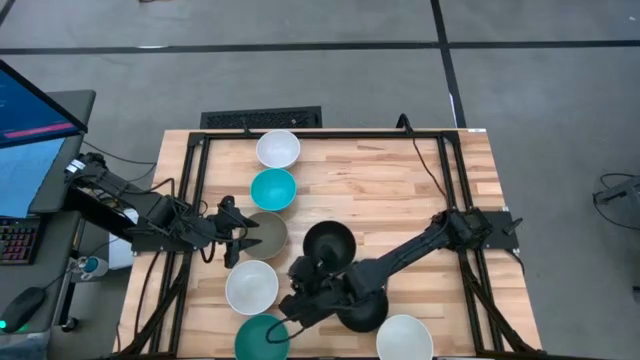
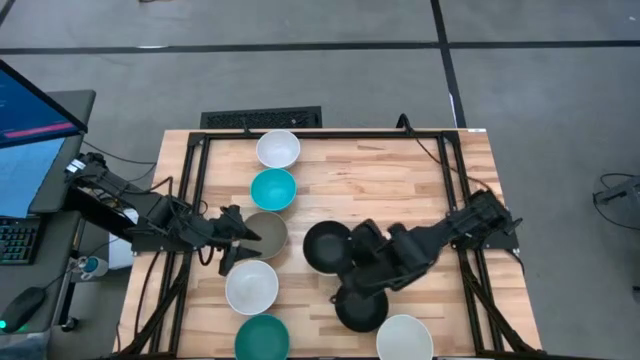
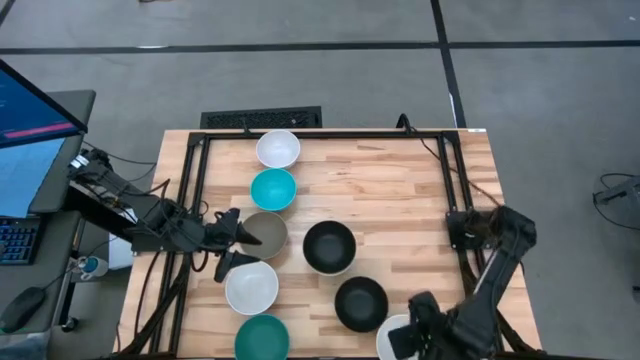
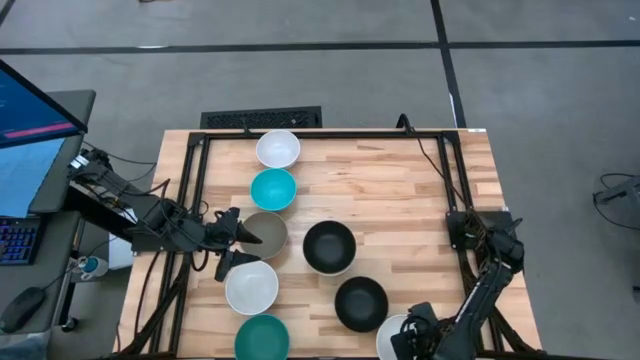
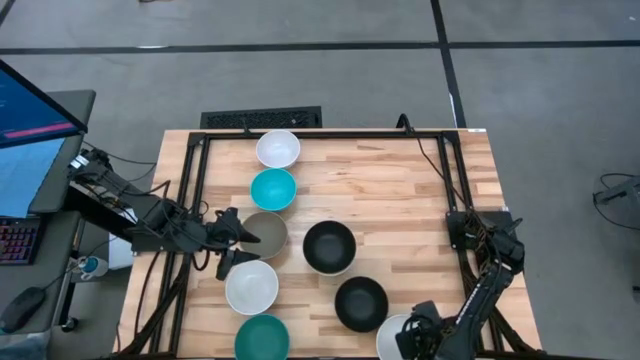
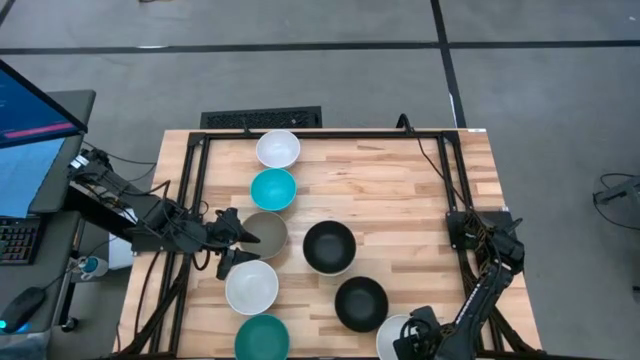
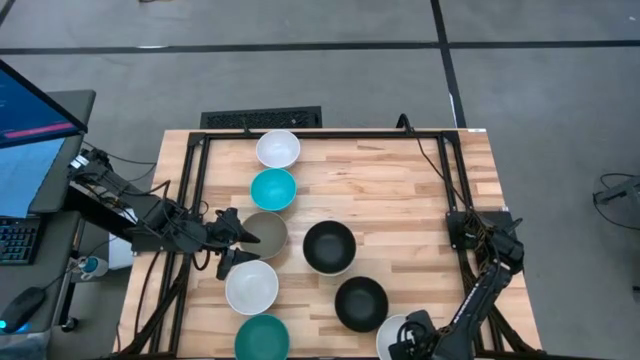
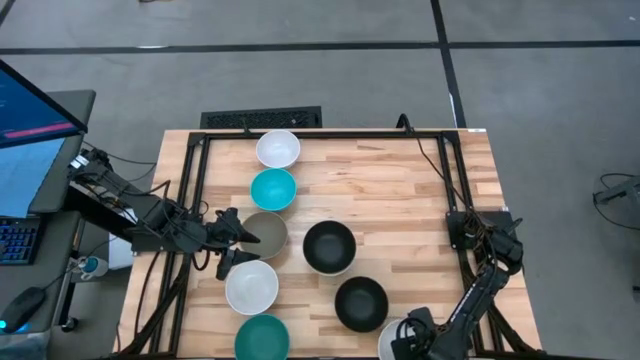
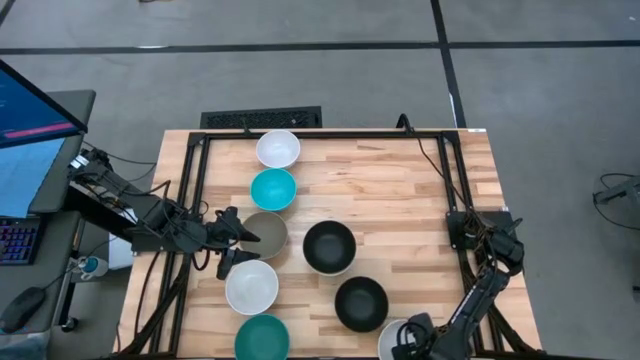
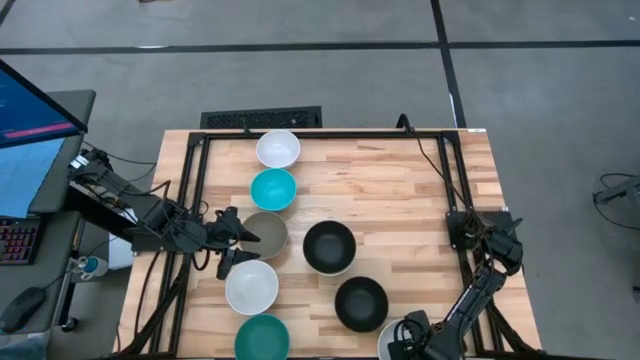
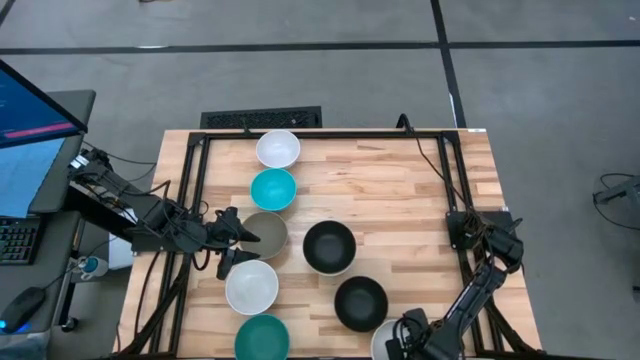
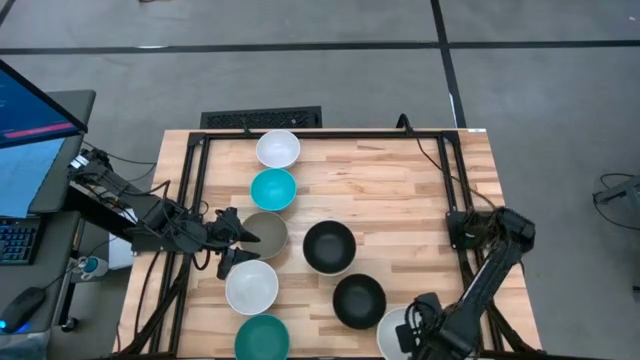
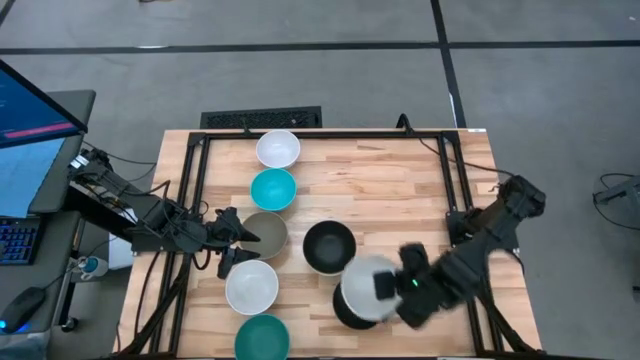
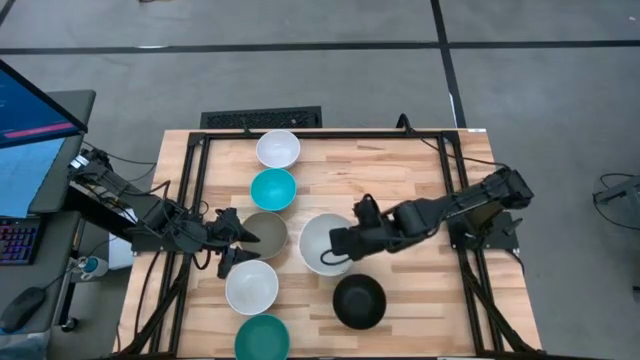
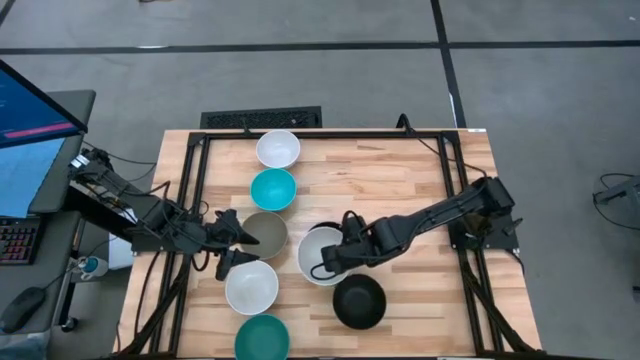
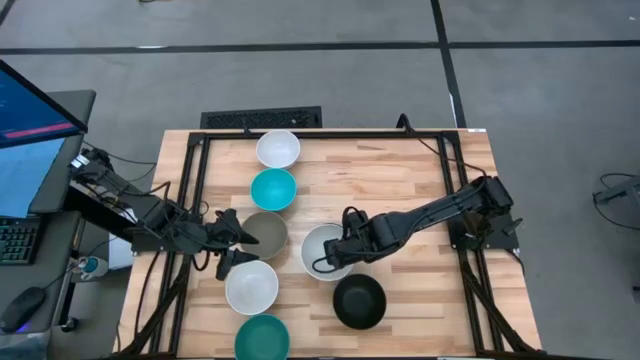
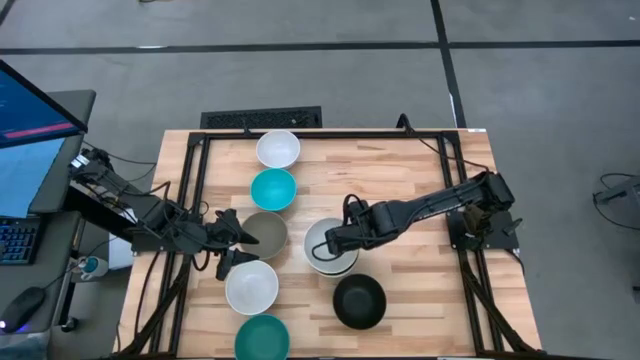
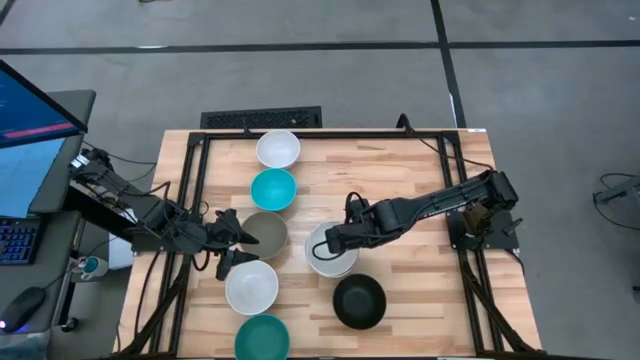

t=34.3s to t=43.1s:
Task: Nest bowls inside each other
Stack the white bowl on the black bowl

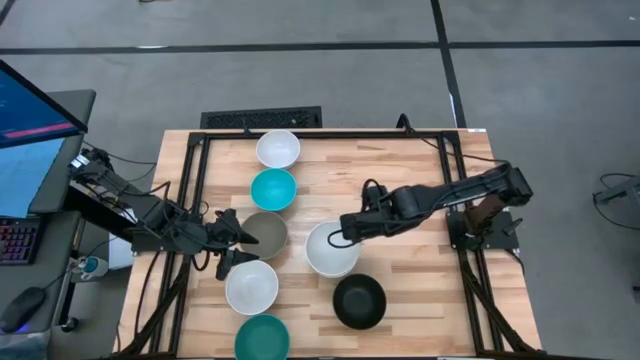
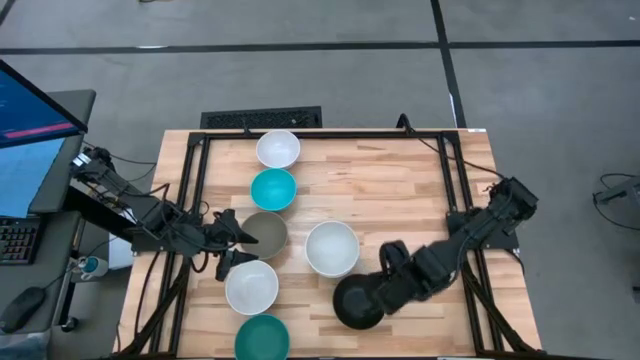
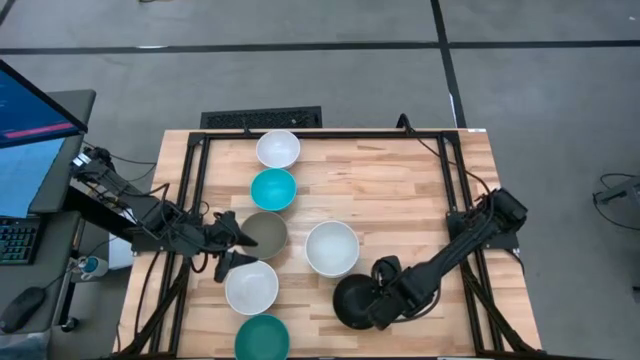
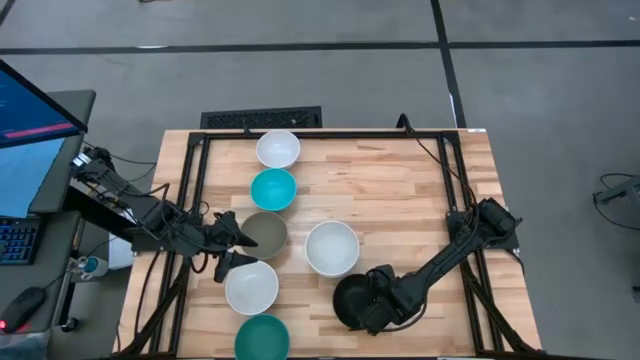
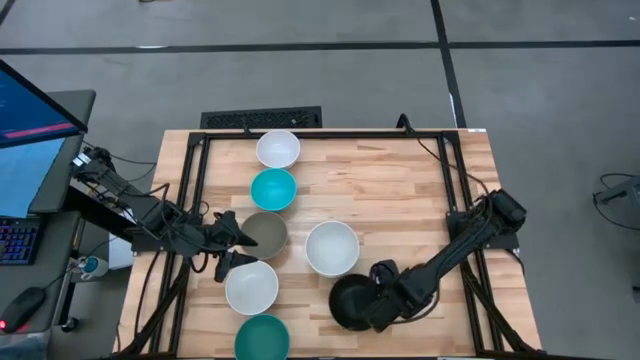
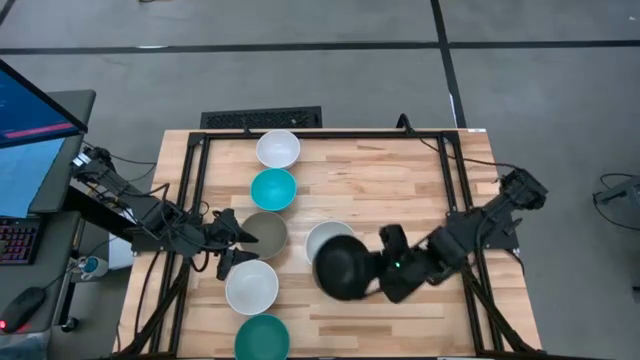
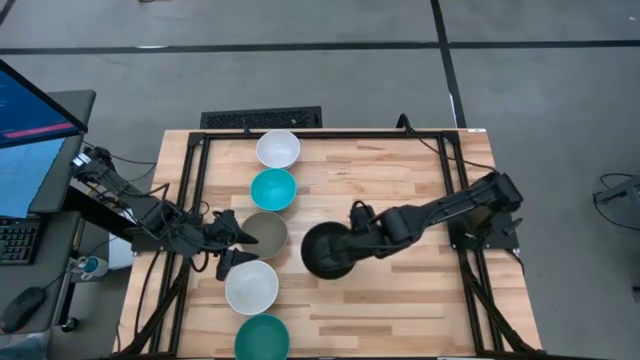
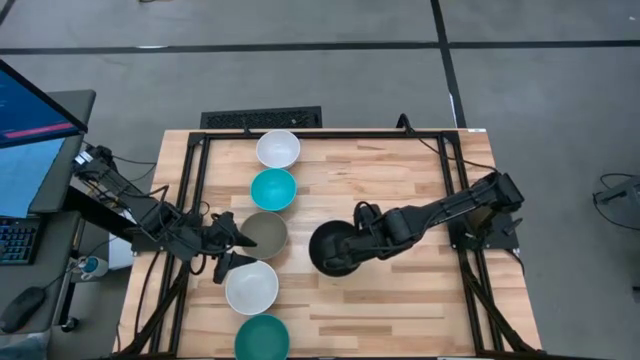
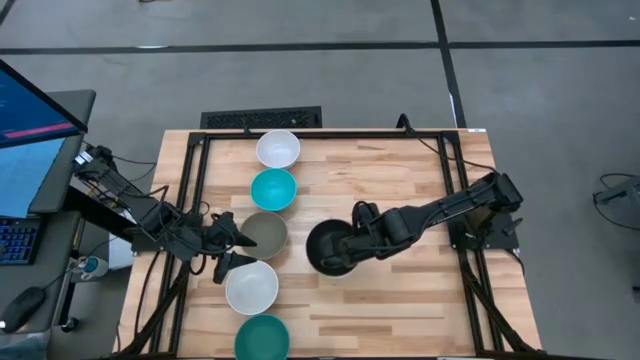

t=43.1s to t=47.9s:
Stack the black bowl on the white bowl

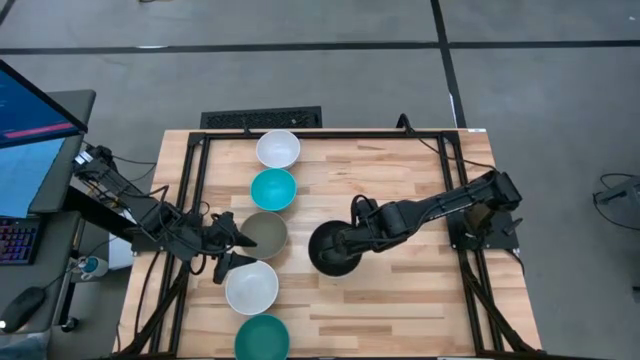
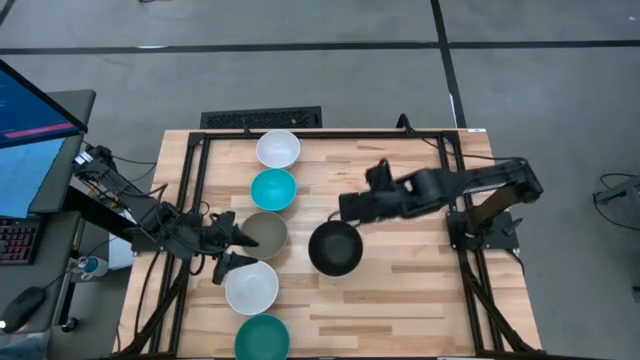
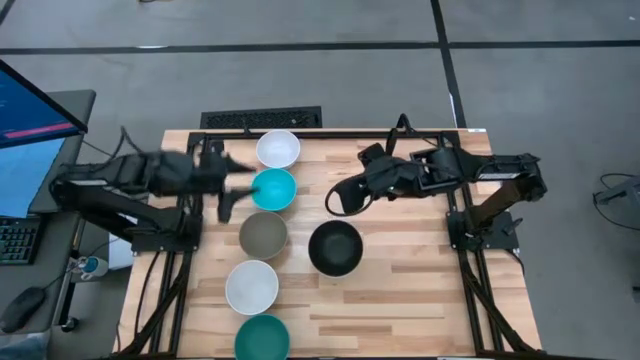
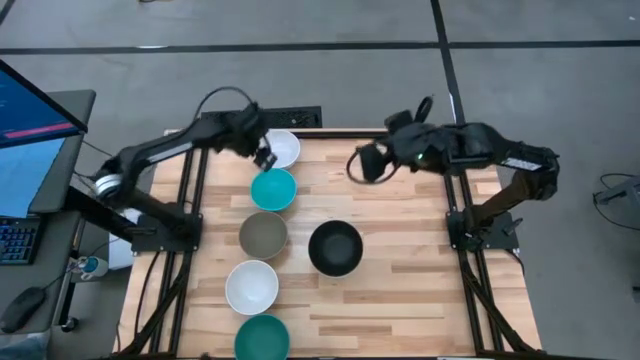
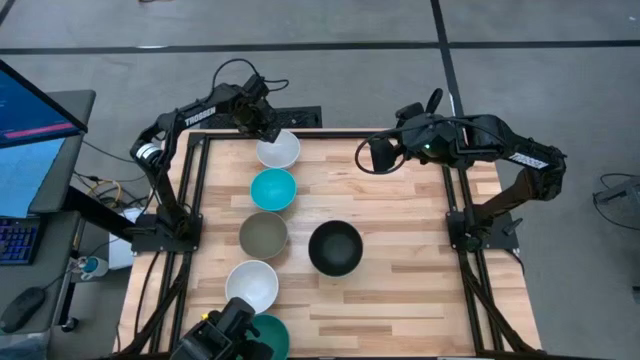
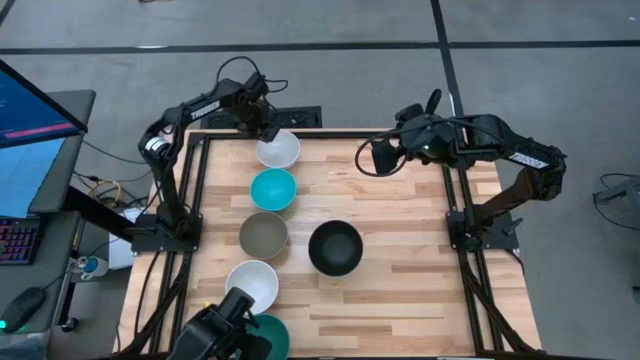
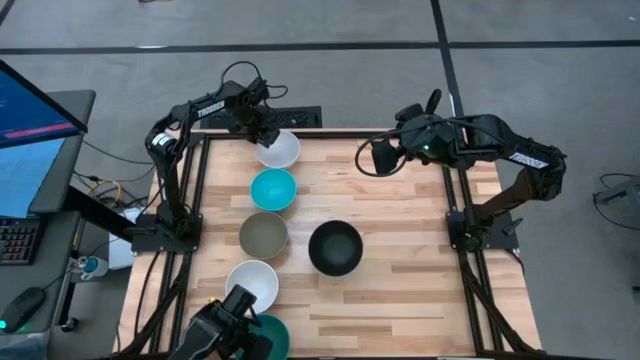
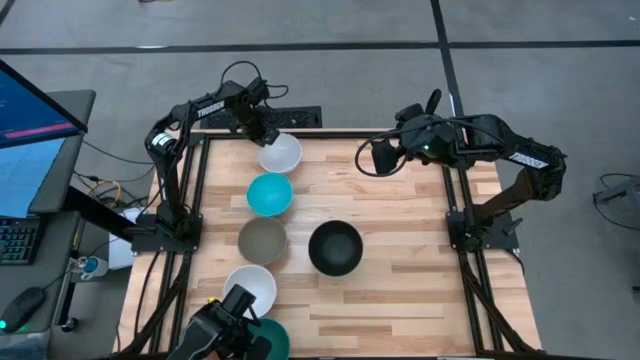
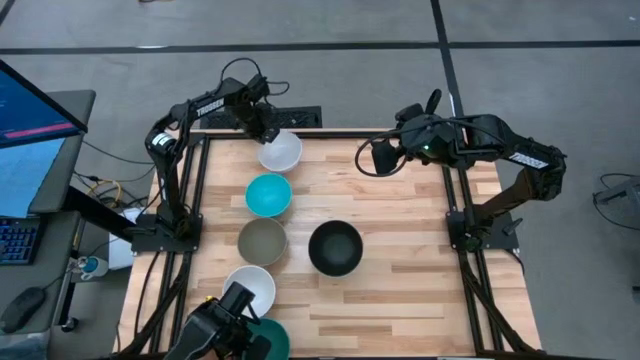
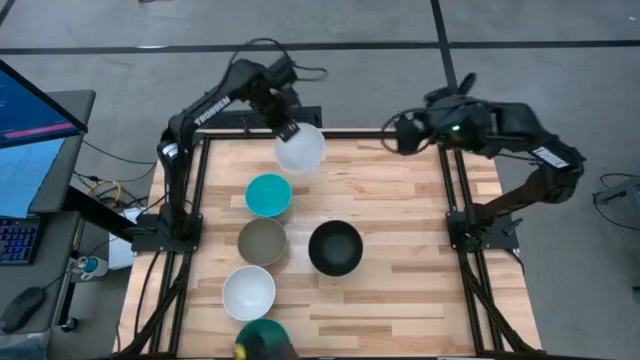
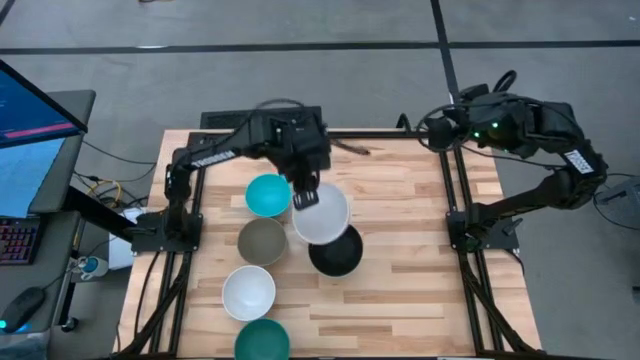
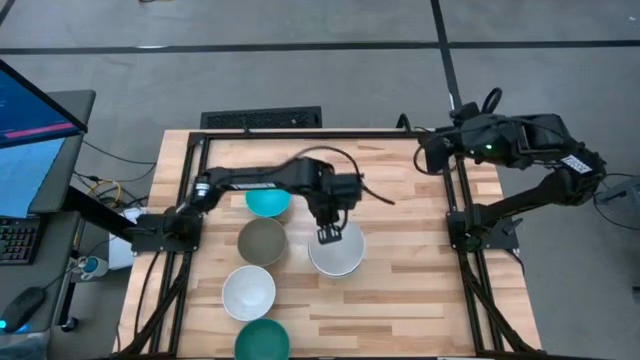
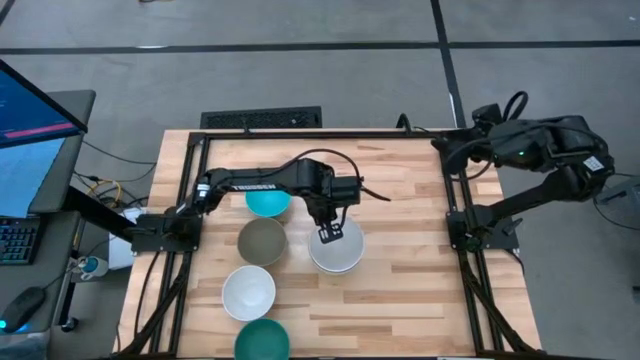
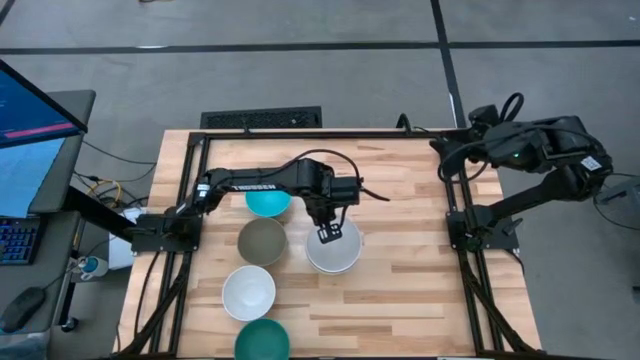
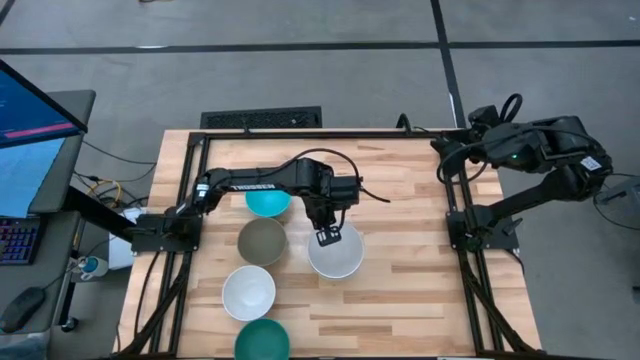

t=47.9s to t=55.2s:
Stack the white bowl on the black bowl
